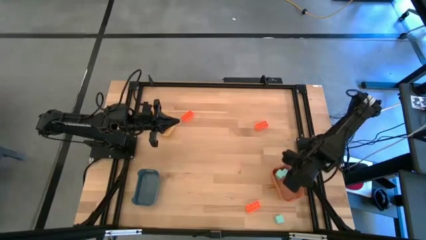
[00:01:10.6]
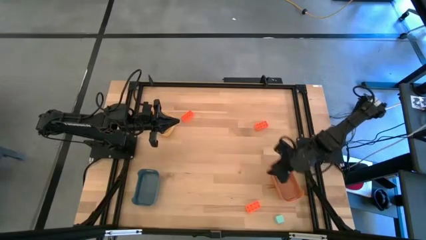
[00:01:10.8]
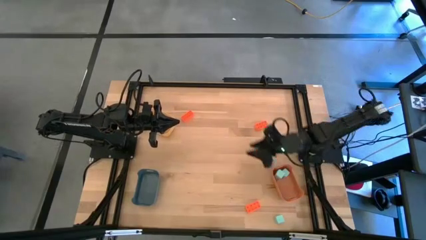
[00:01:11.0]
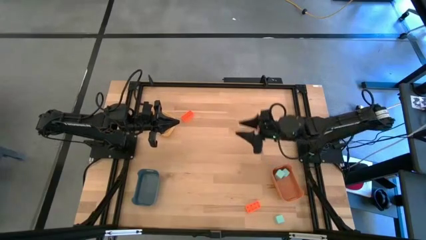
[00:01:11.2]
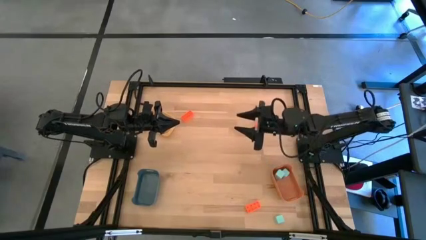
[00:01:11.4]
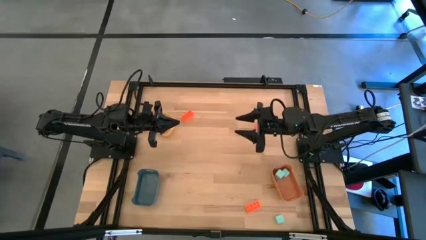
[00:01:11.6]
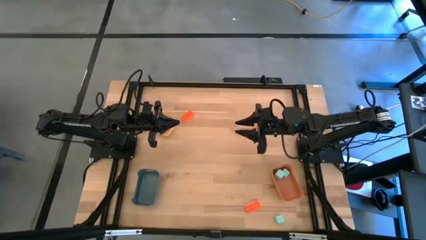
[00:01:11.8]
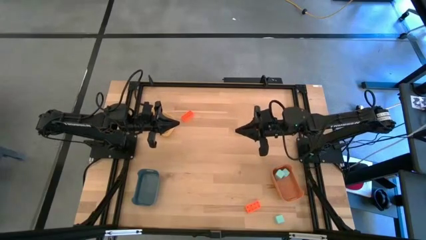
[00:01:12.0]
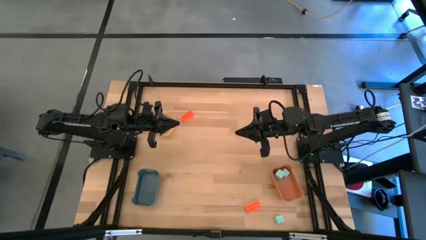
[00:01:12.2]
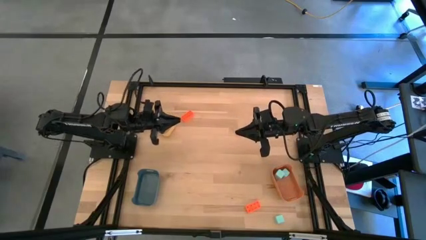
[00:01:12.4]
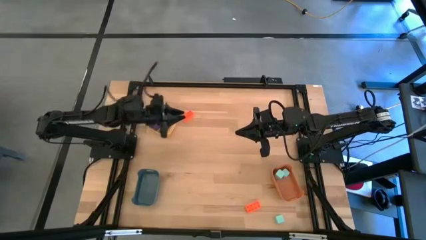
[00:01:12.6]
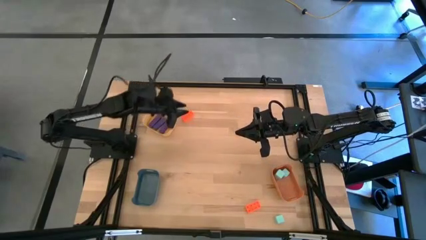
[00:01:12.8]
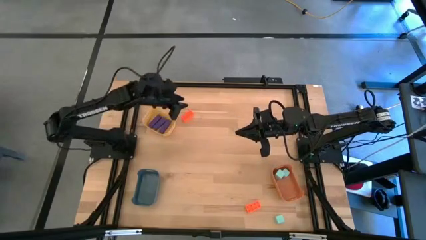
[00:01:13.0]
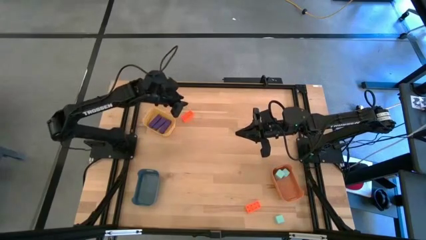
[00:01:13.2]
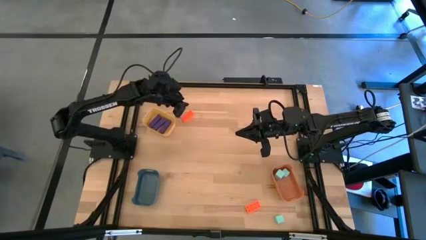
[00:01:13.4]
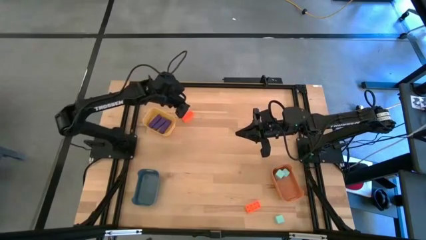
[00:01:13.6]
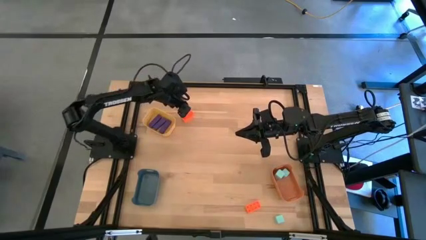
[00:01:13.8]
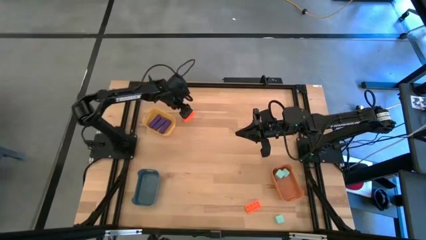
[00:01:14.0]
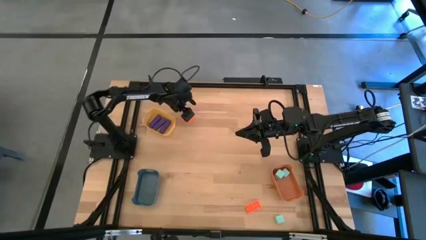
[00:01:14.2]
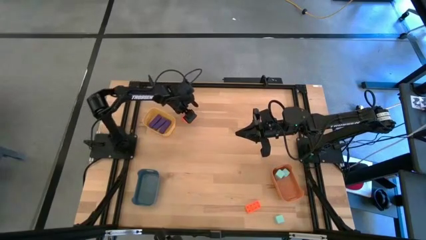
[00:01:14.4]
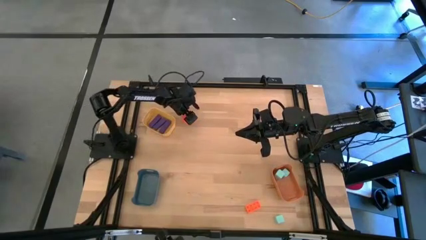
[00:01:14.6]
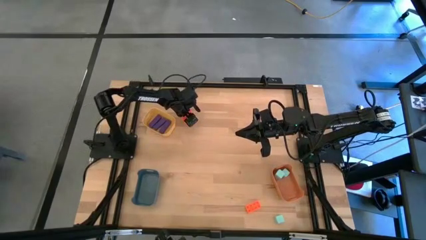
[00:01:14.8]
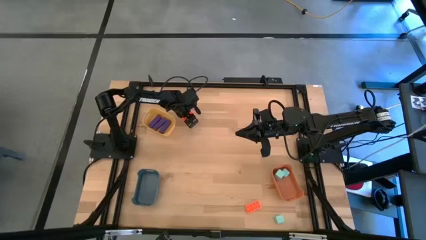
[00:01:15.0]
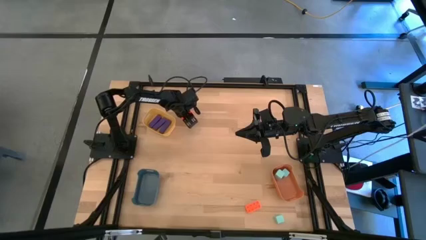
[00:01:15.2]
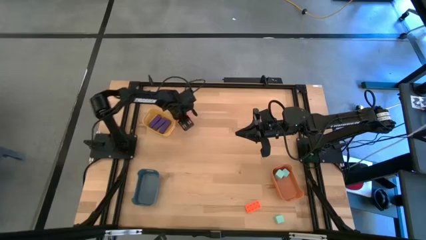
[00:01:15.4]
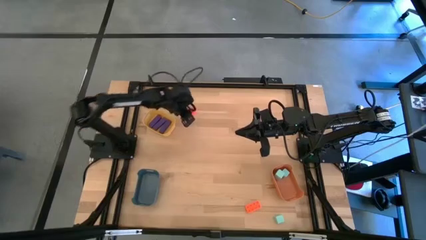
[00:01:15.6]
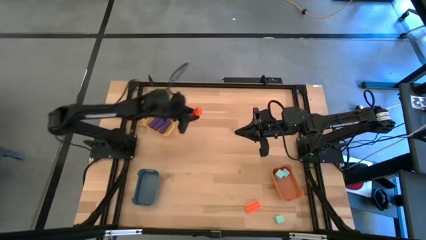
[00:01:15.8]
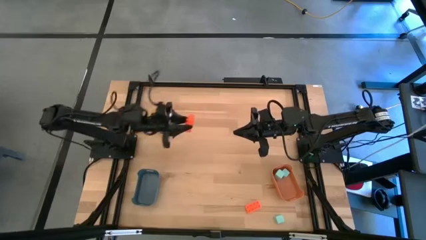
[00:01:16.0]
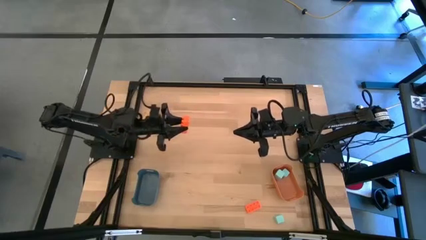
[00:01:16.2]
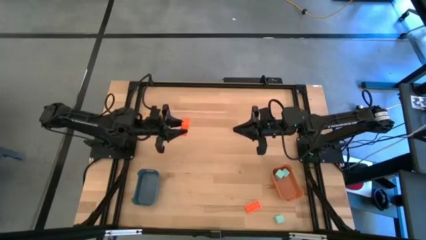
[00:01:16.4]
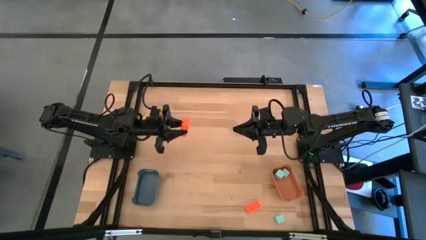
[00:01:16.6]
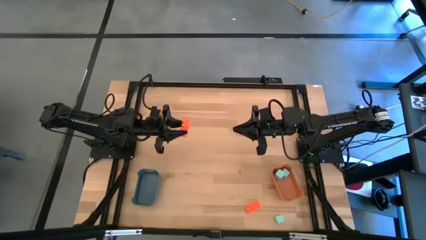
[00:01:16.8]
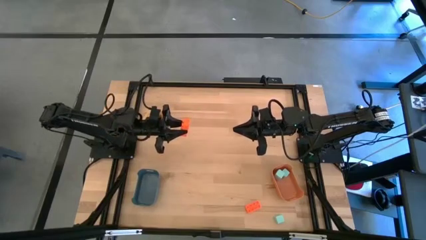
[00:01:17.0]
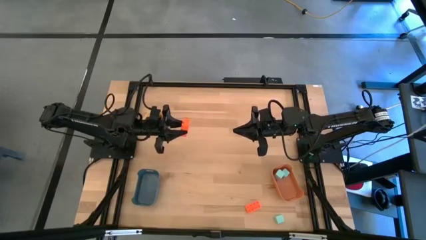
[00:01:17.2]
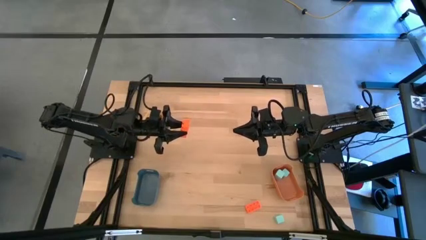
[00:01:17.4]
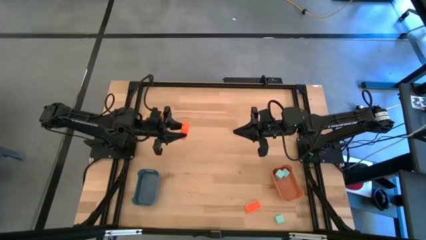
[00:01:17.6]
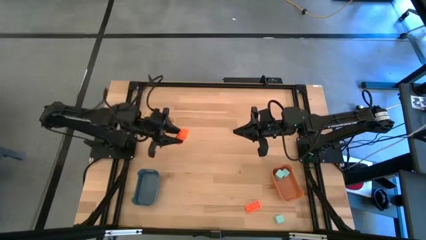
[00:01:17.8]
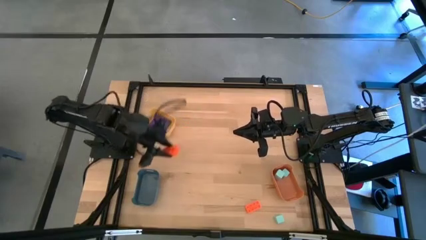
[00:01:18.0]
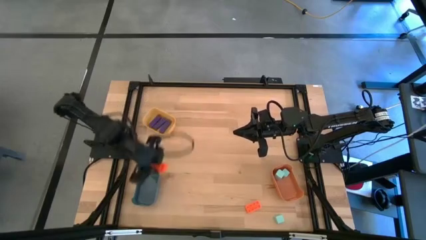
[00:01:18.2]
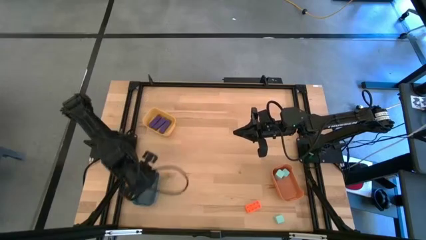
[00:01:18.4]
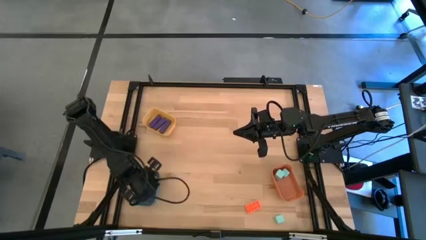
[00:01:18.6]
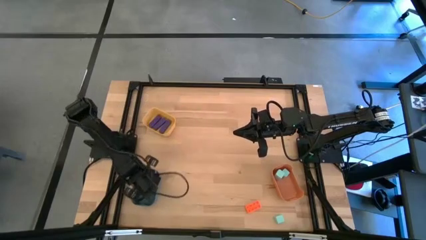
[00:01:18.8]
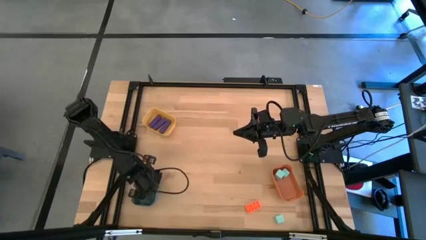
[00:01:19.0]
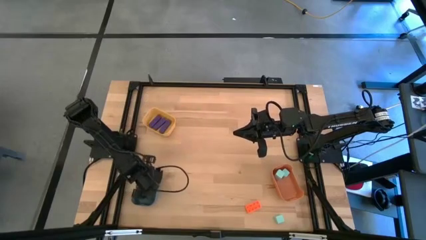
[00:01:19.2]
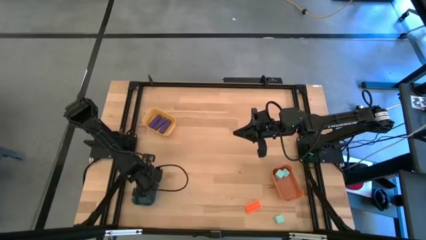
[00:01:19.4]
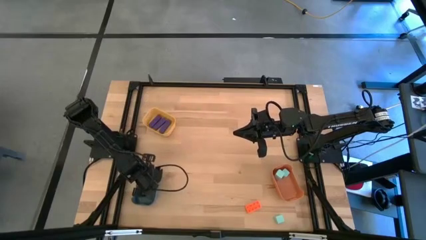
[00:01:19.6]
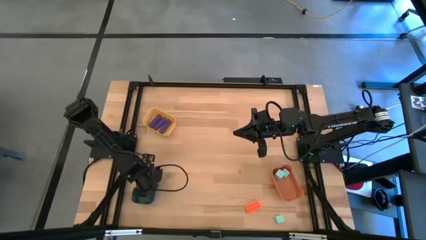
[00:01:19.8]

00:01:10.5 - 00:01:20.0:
Task: Sort & place blocks by color
Put the top left orange game piece into the green bin
